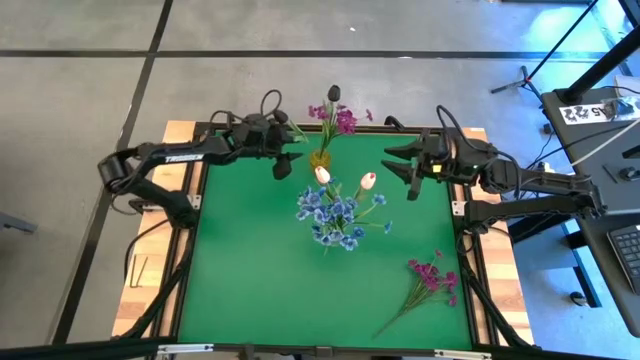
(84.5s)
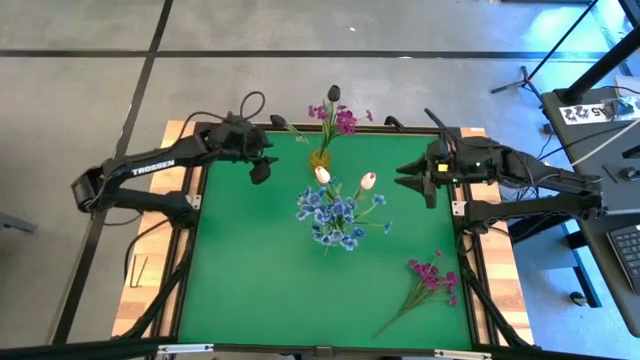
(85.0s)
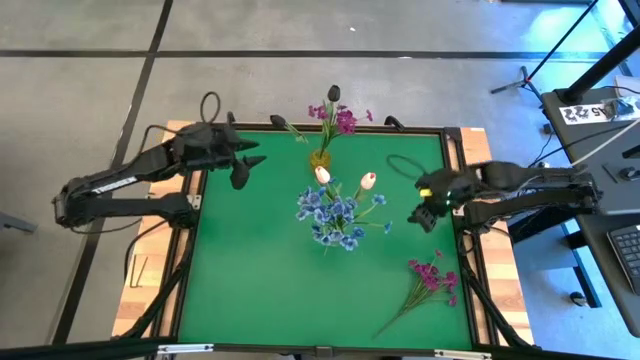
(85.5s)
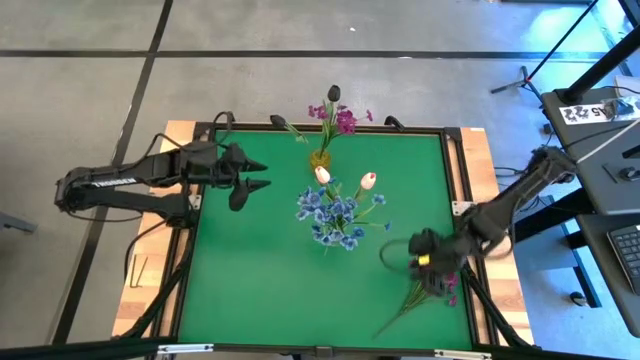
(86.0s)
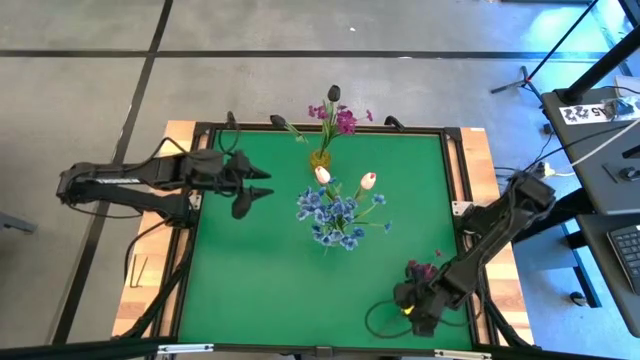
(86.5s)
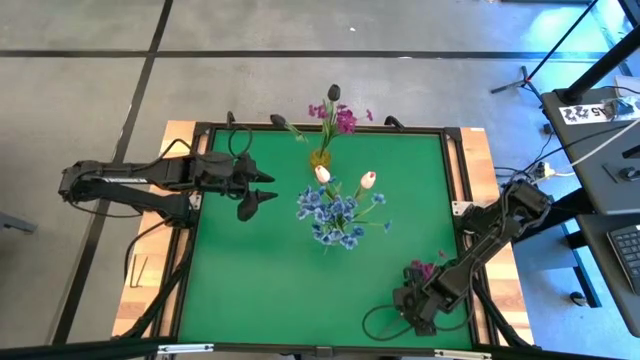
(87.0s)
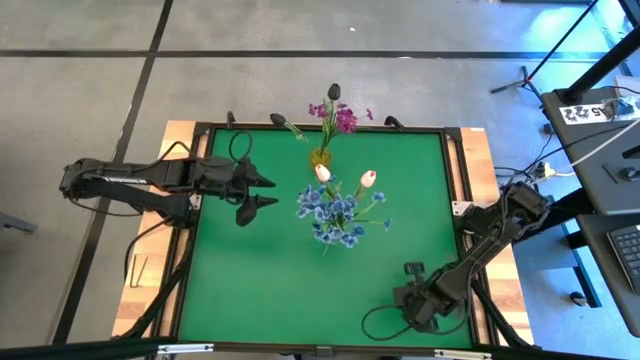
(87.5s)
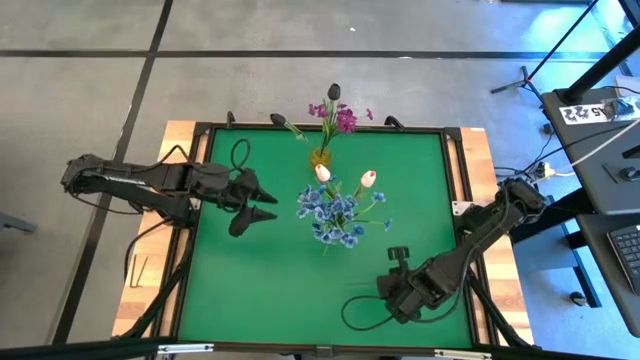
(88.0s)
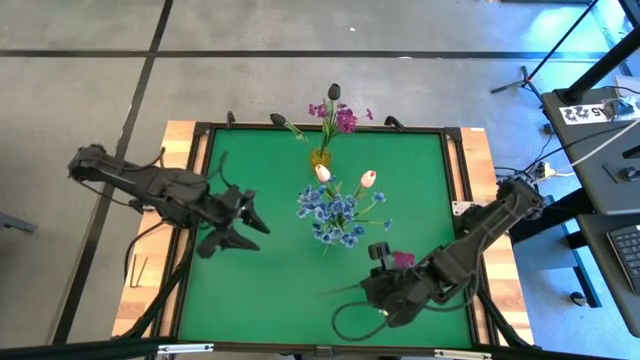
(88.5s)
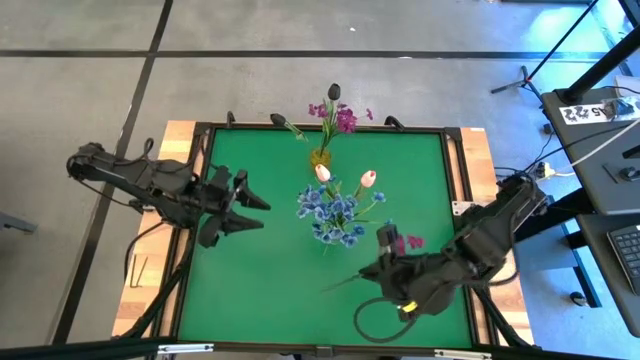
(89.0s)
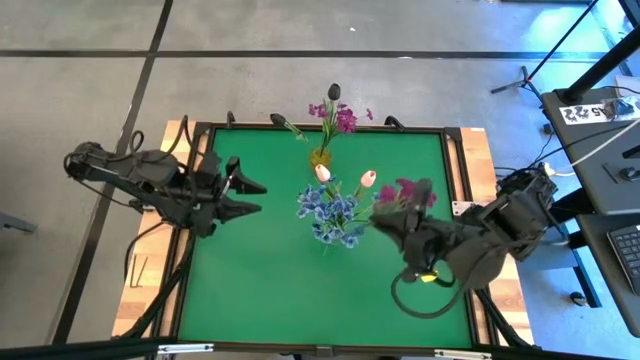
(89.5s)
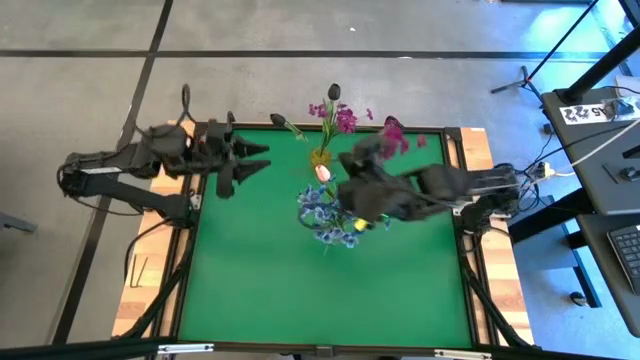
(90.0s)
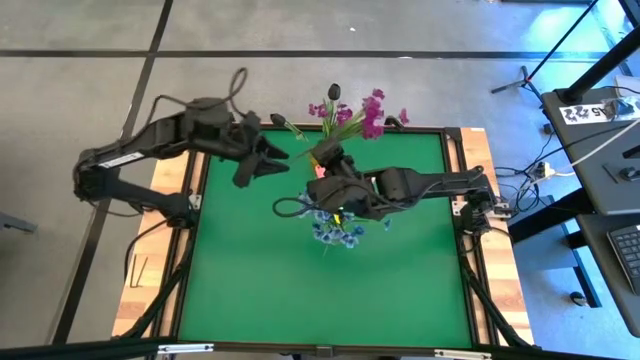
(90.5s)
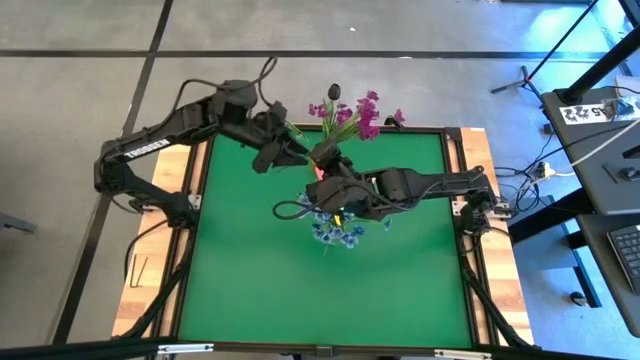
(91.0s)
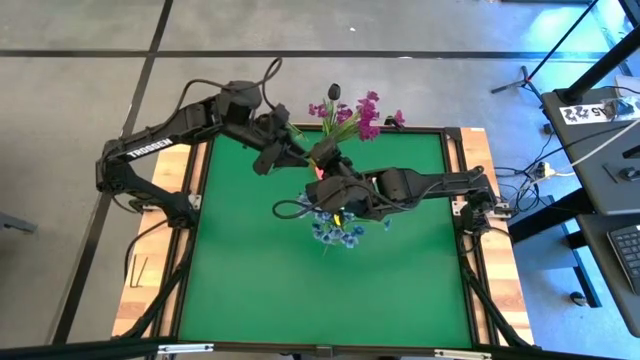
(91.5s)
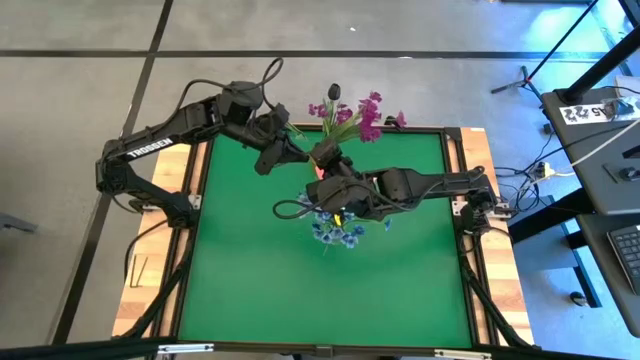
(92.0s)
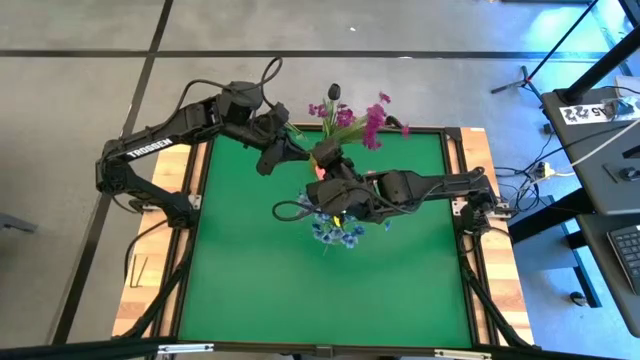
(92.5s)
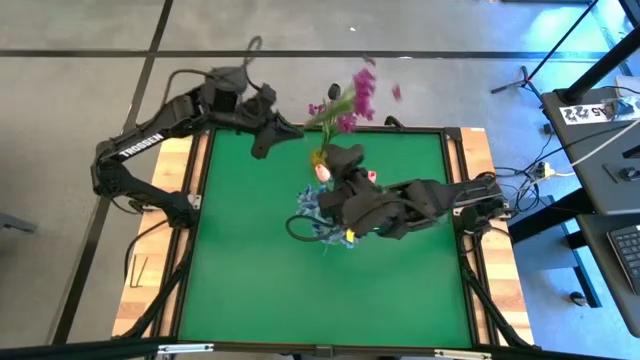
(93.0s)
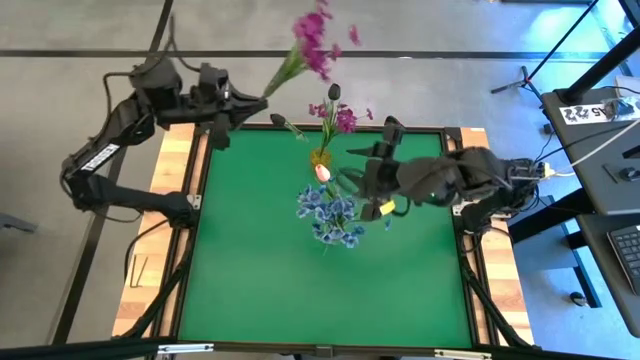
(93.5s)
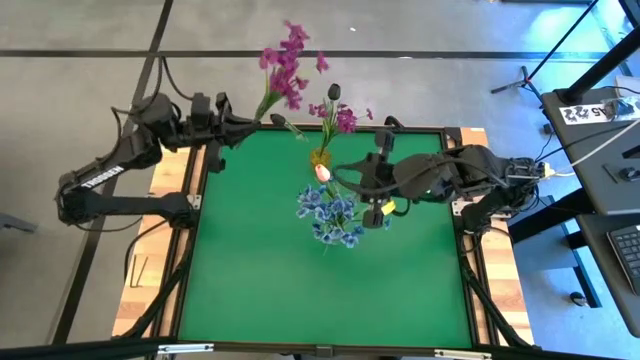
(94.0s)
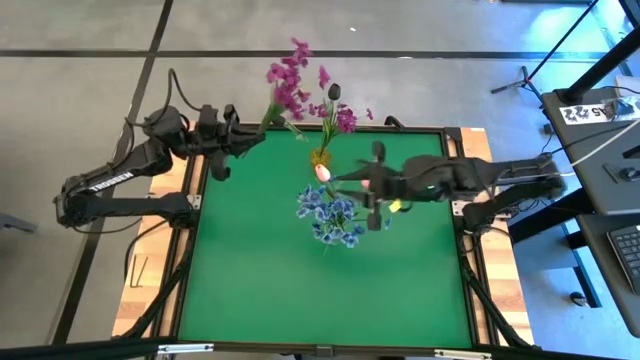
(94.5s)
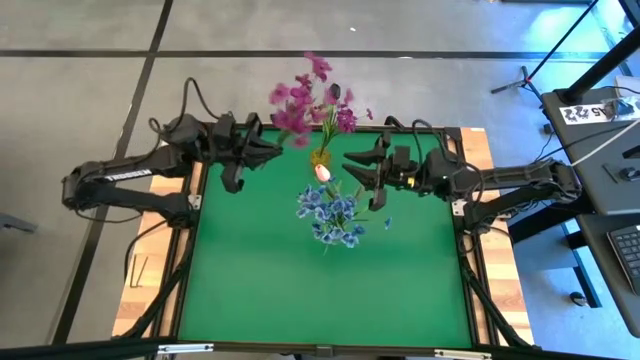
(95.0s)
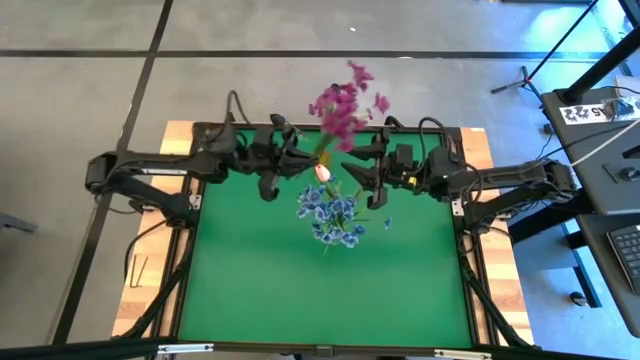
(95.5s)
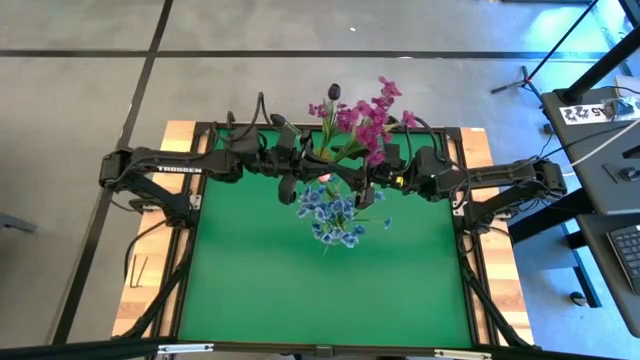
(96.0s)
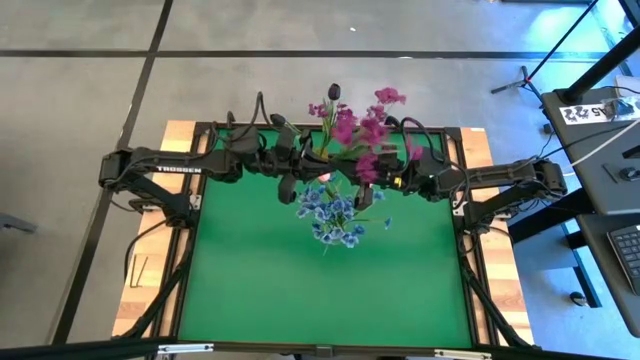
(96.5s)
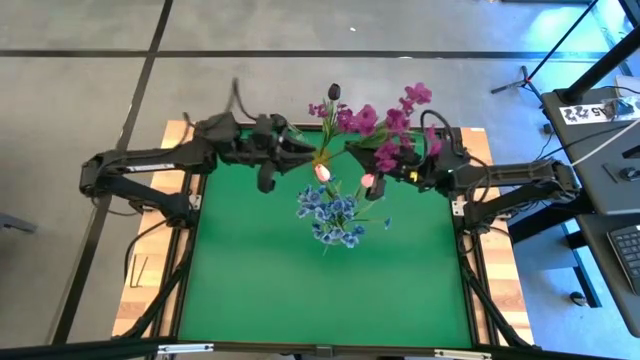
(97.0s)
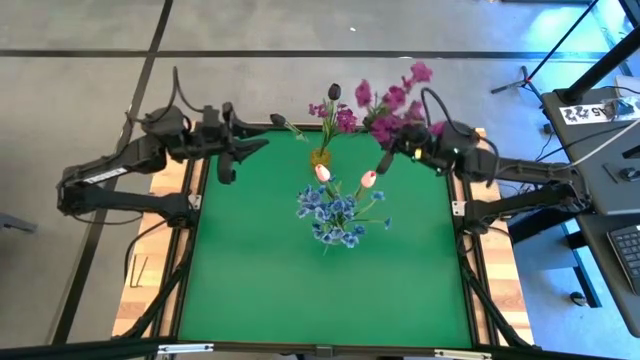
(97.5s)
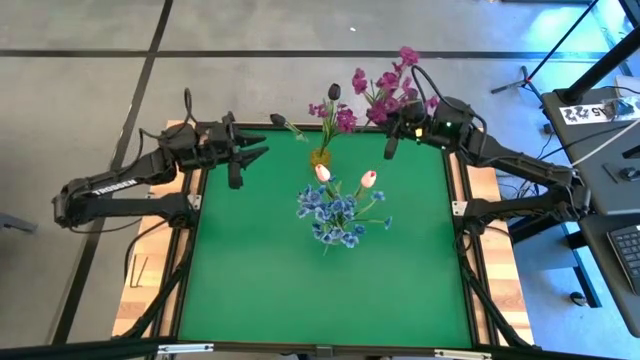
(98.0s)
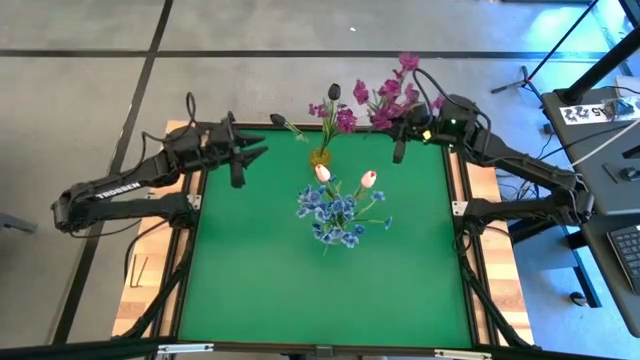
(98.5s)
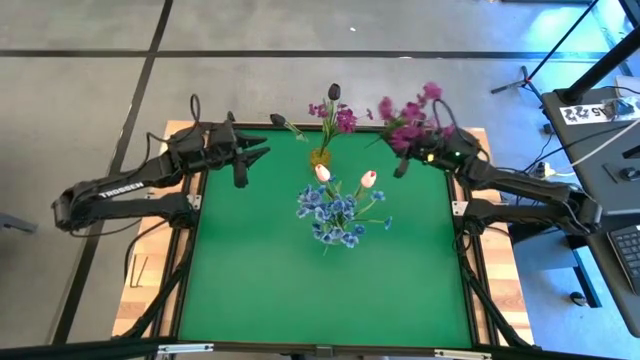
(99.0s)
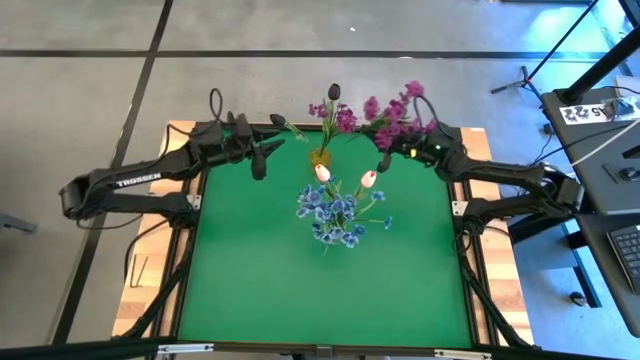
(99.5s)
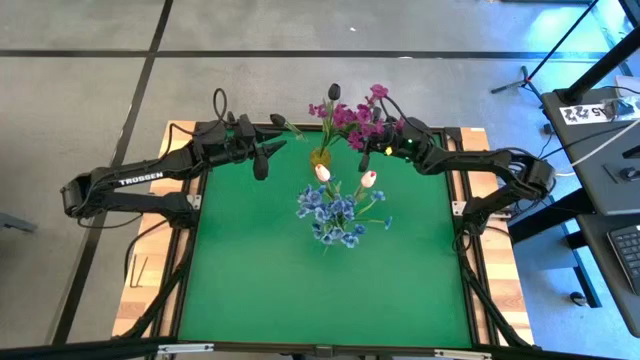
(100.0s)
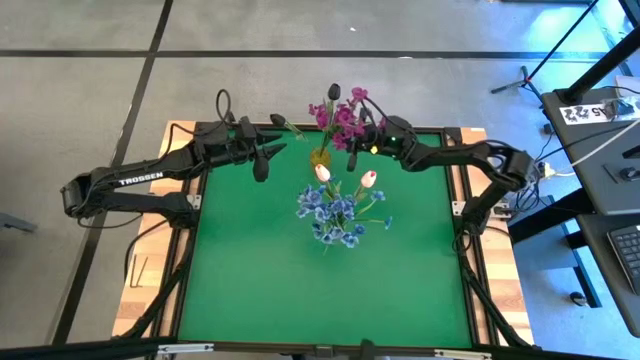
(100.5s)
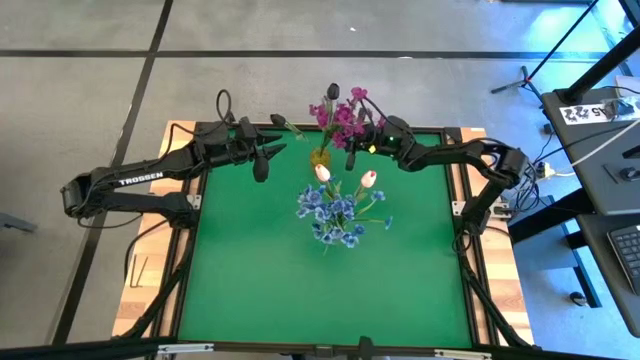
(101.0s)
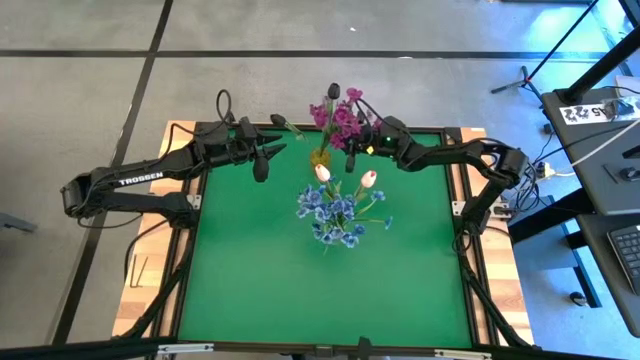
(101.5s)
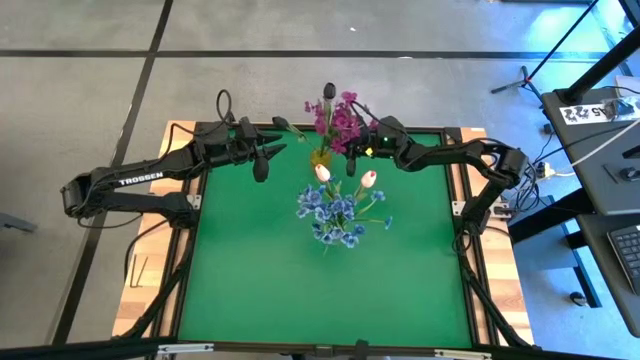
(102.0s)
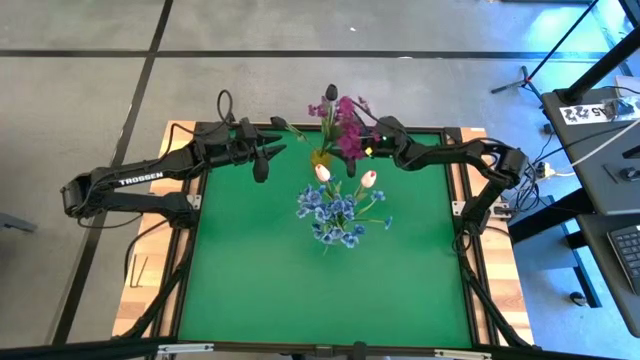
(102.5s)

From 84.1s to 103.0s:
Task: Sort flowers into vase by color
Put the violet flowers in the yellow vase

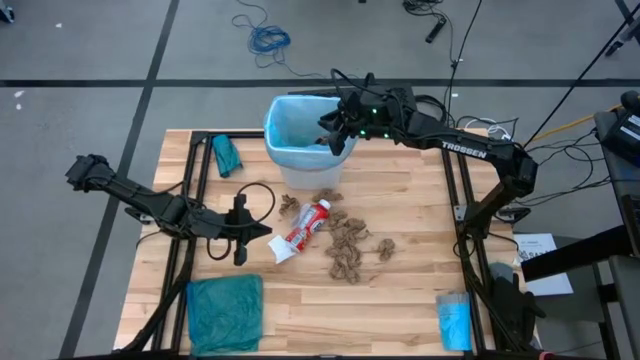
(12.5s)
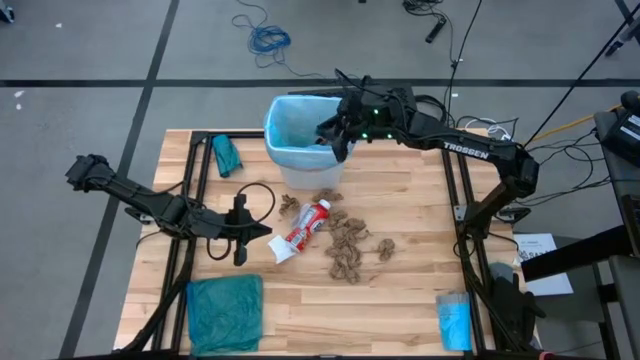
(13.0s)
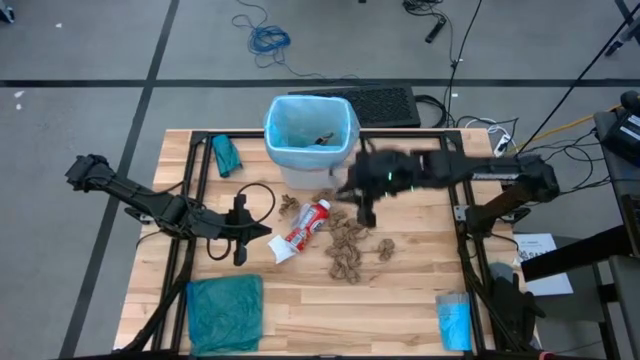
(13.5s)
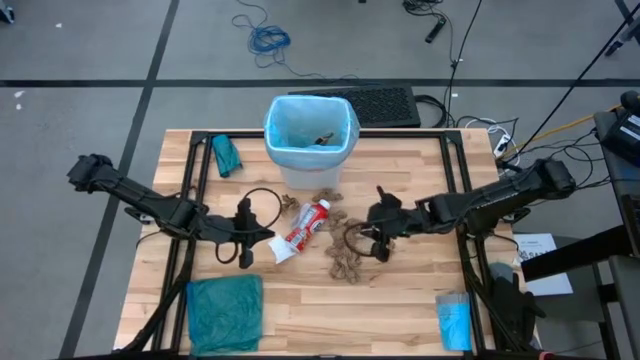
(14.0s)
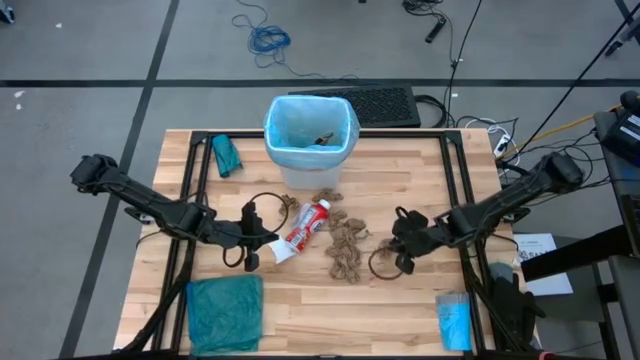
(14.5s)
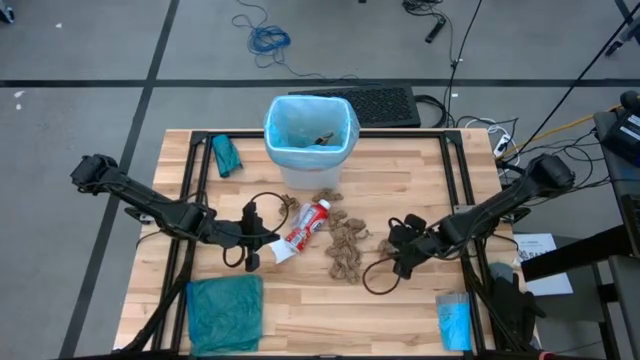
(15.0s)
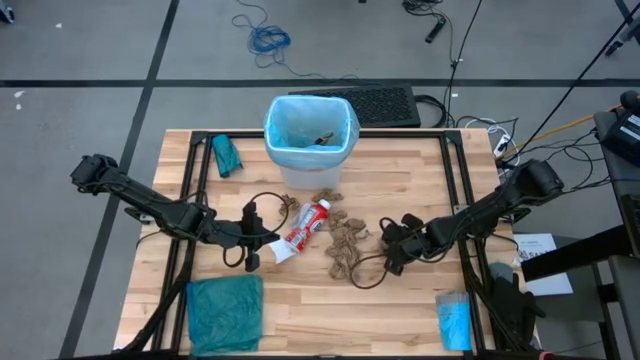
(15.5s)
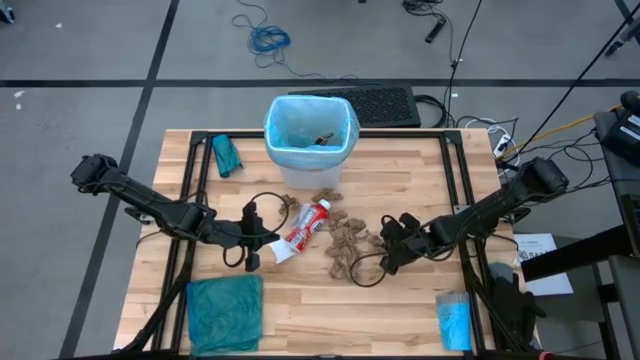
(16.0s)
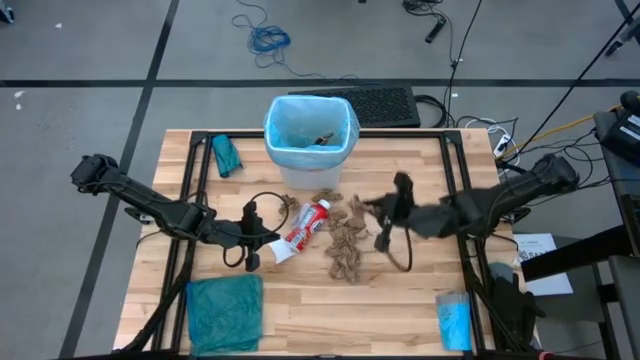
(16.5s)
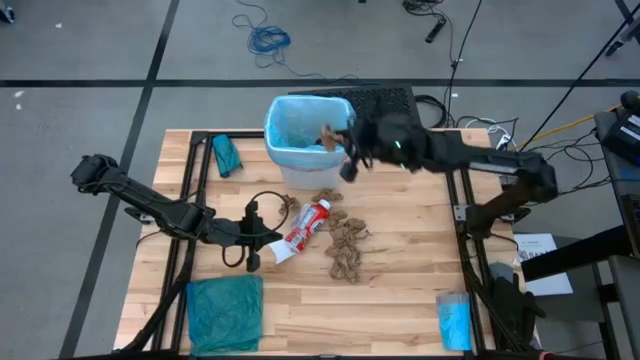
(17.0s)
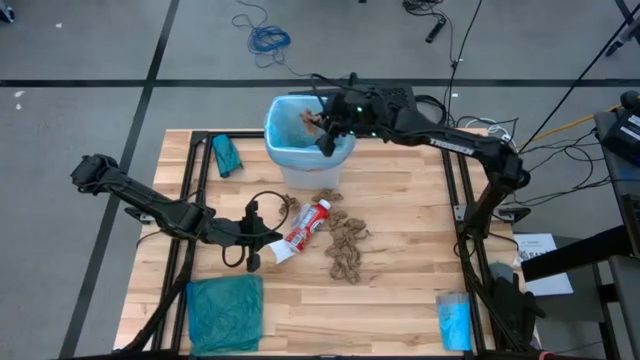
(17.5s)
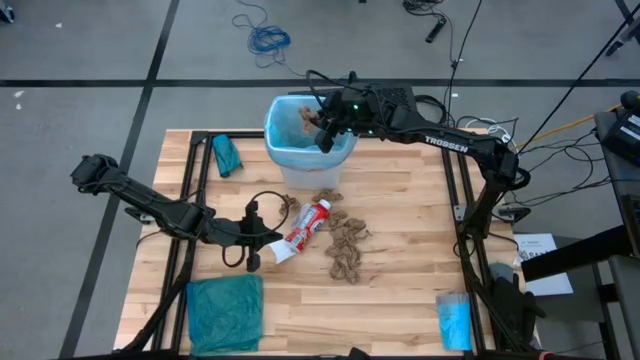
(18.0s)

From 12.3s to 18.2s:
Task: place trash/remove bag and relplace
Put the brown paper into the blue trash bag inside the white trash bin
